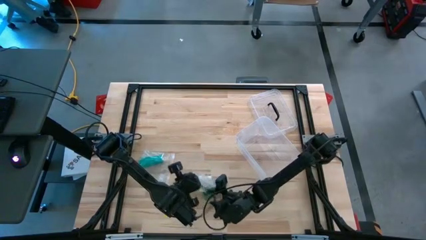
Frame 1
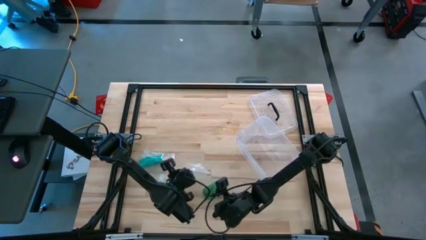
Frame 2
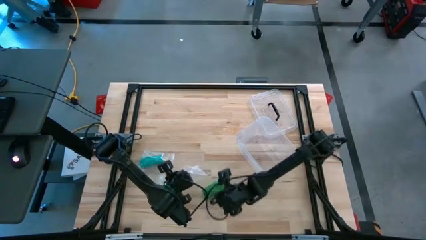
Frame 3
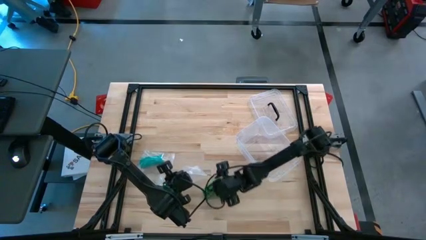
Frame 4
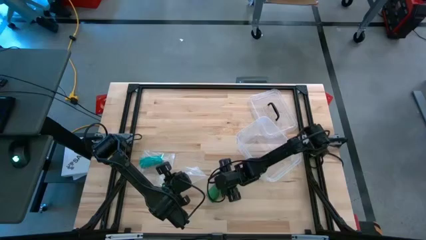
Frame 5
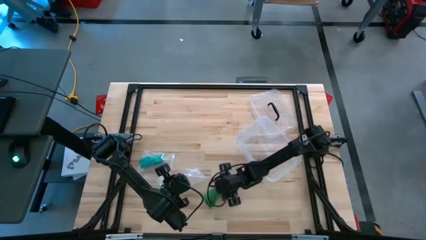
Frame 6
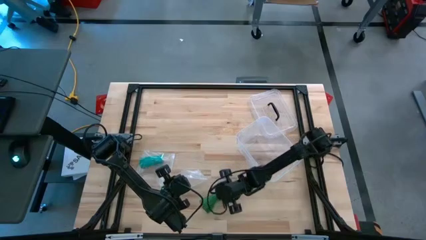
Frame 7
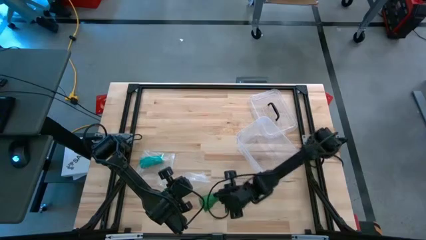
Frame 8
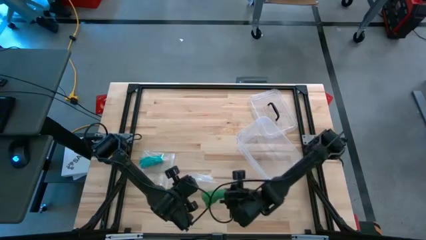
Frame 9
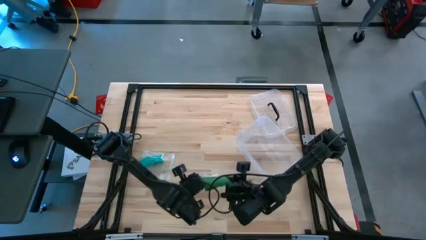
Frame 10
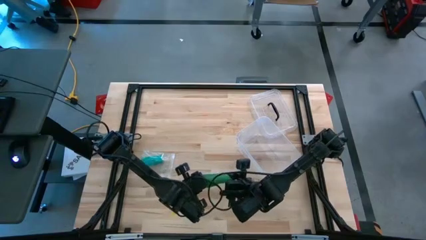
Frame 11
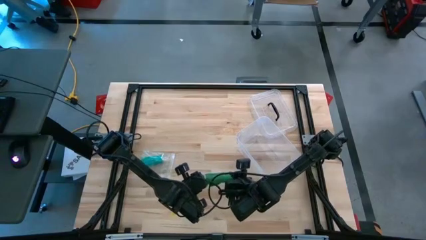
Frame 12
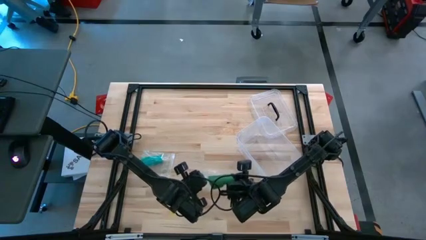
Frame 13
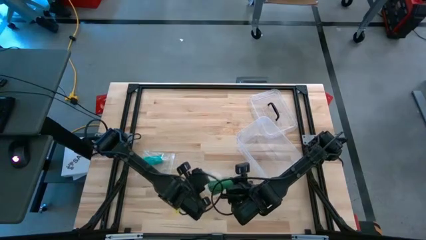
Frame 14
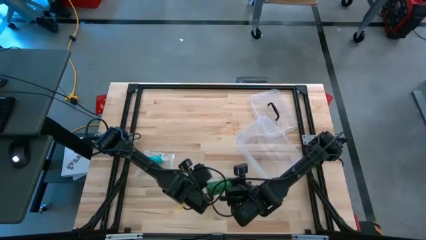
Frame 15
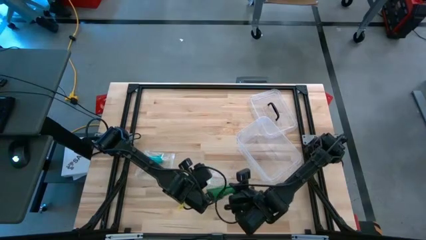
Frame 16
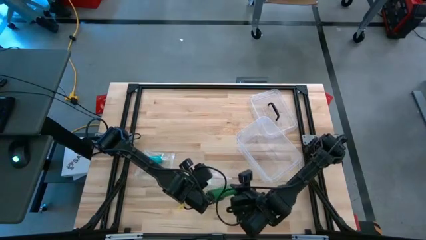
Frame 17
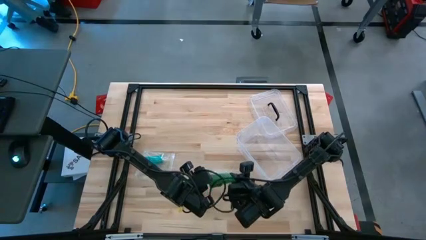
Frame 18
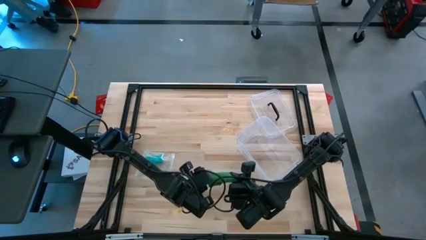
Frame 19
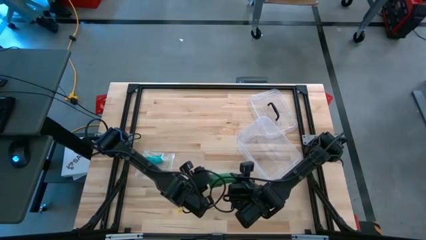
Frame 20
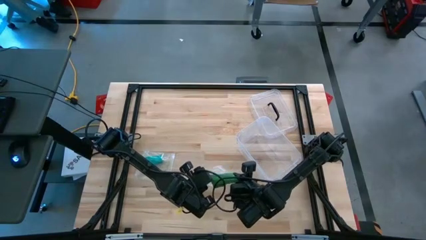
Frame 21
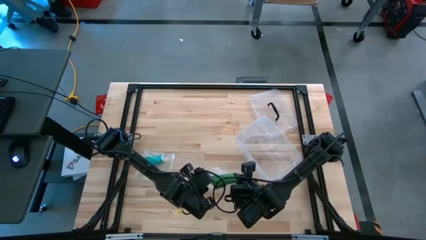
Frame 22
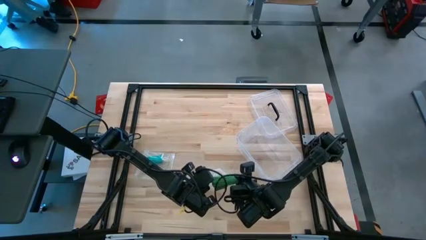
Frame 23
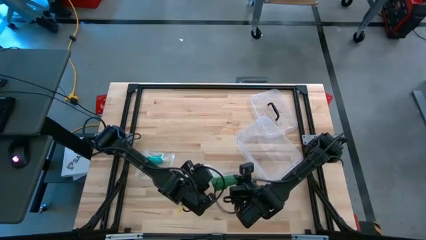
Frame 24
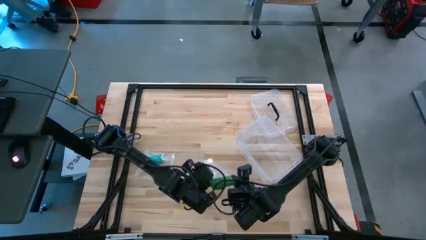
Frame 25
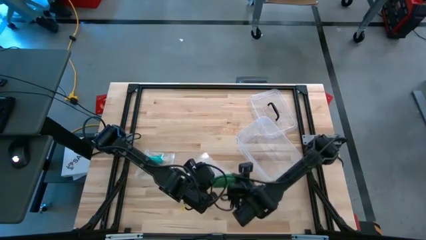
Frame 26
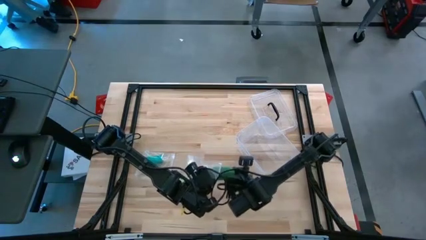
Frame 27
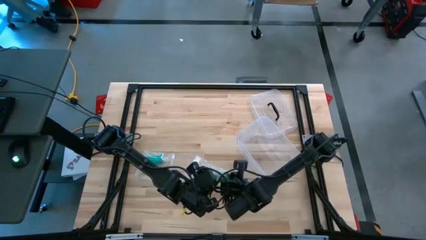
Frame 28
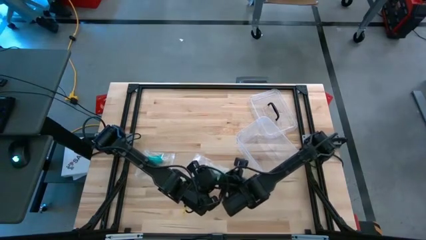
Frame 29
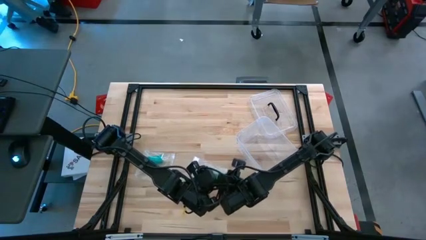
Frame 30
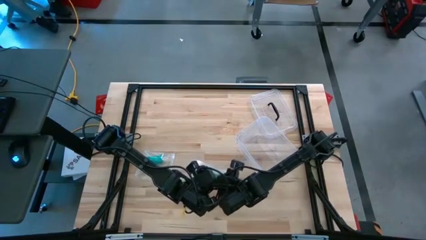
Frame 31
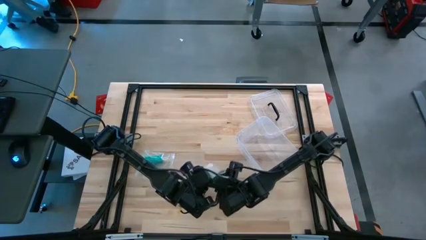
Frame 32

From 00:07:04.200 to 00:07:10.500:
Task: Roll bandage
Put the rolled green bandage into the transparent zip bag

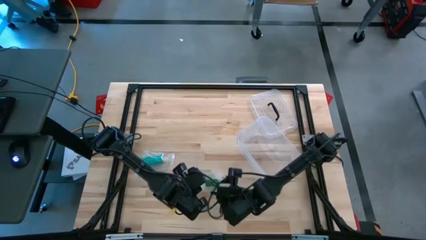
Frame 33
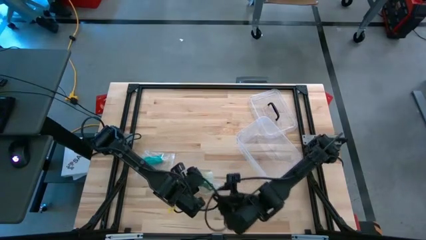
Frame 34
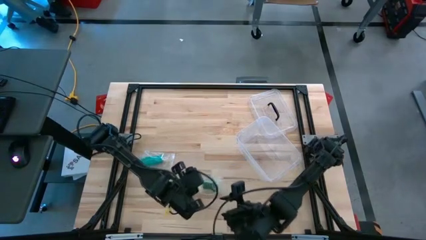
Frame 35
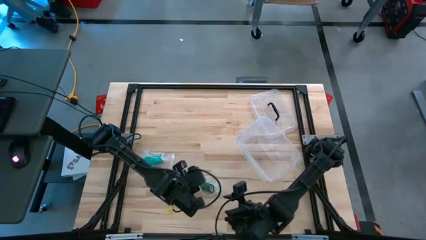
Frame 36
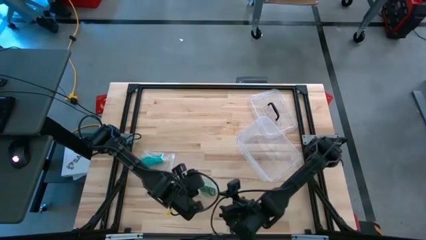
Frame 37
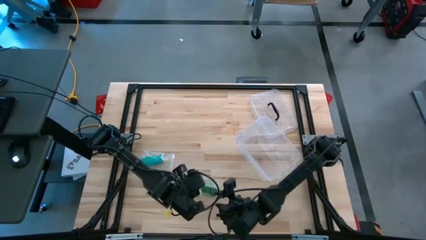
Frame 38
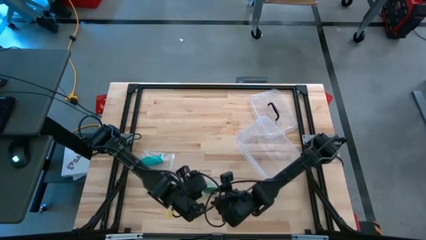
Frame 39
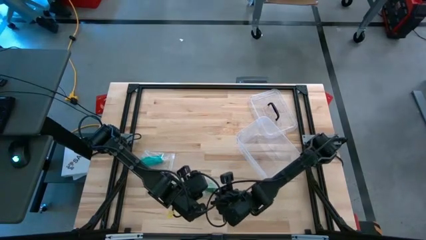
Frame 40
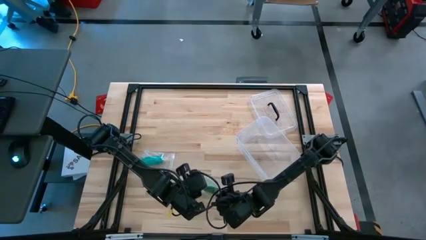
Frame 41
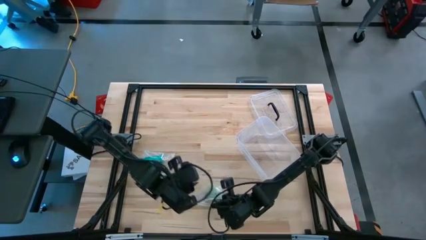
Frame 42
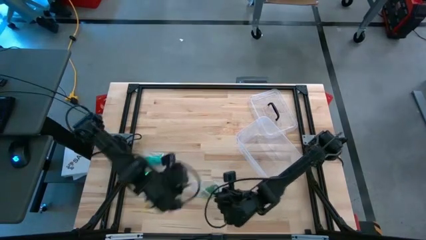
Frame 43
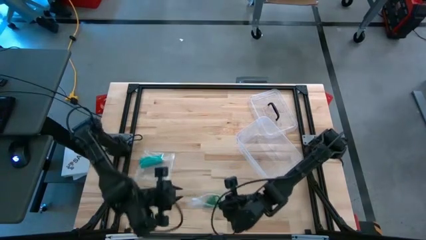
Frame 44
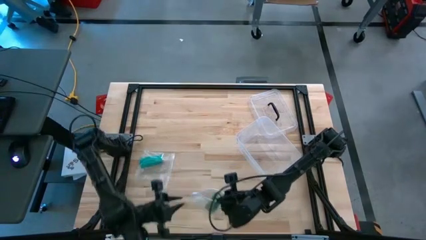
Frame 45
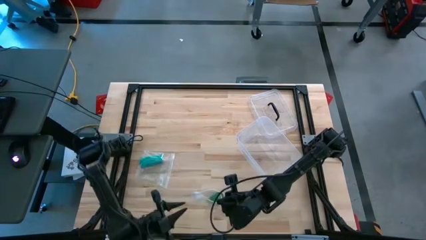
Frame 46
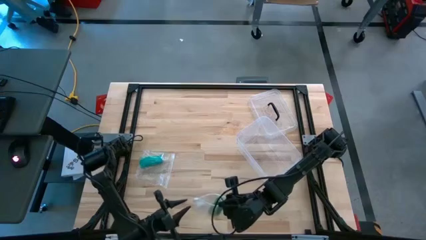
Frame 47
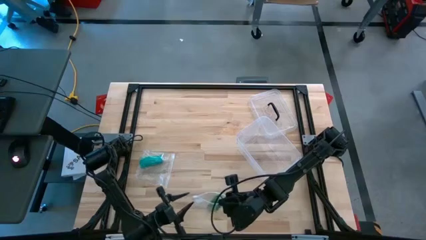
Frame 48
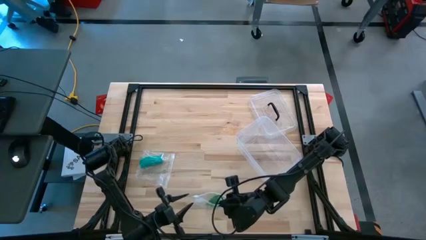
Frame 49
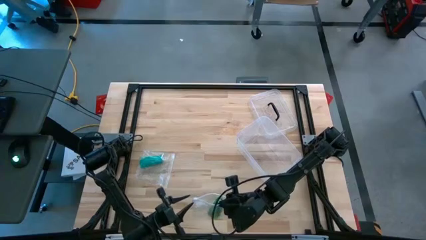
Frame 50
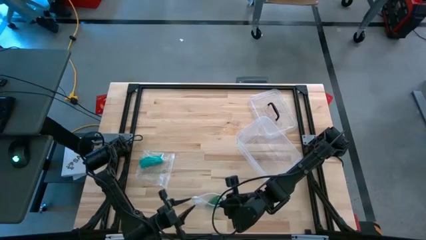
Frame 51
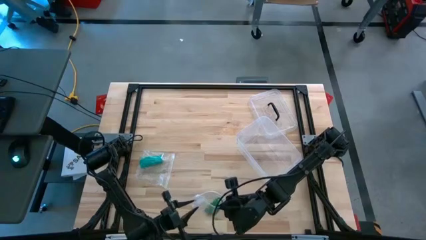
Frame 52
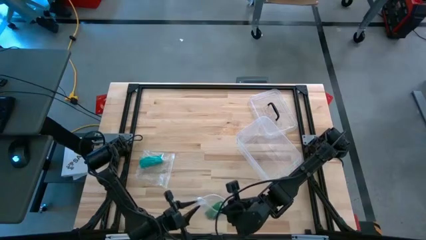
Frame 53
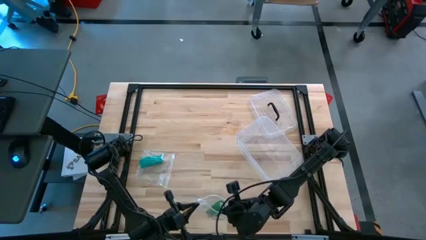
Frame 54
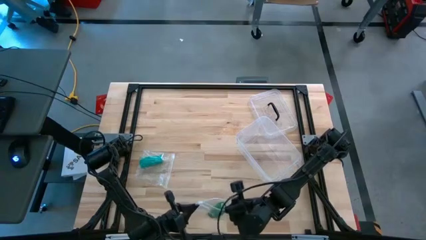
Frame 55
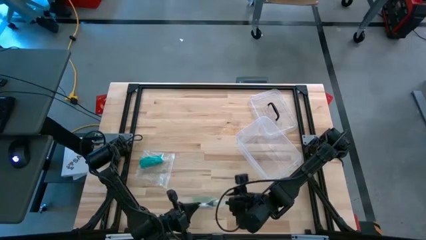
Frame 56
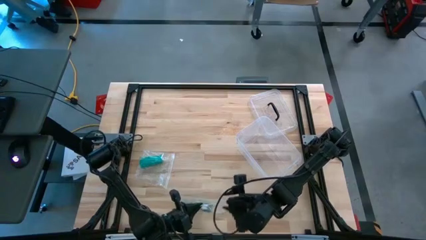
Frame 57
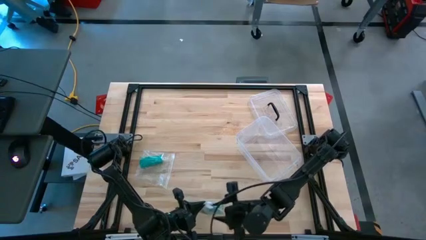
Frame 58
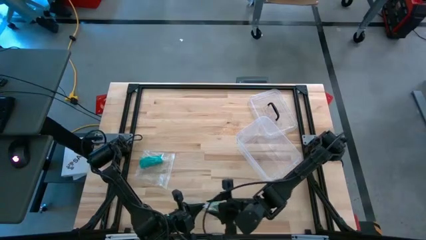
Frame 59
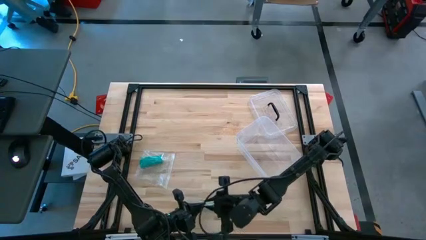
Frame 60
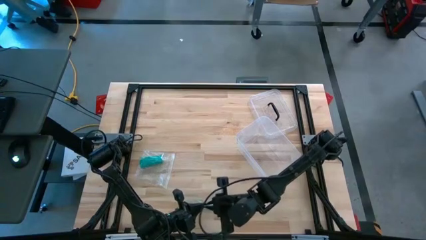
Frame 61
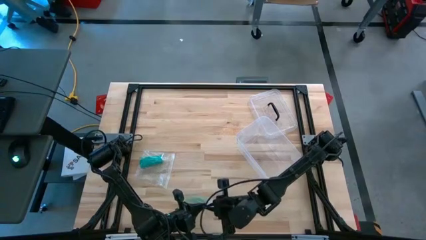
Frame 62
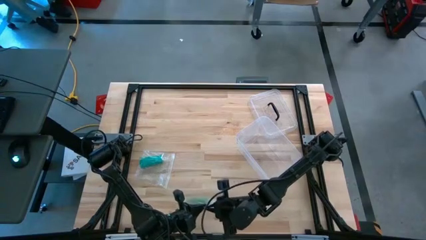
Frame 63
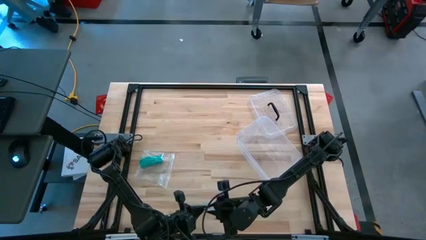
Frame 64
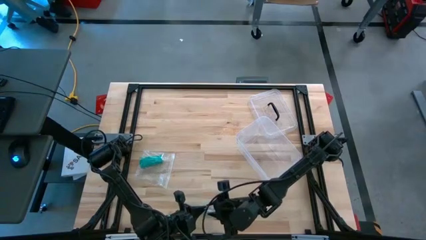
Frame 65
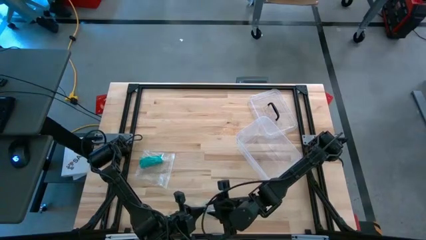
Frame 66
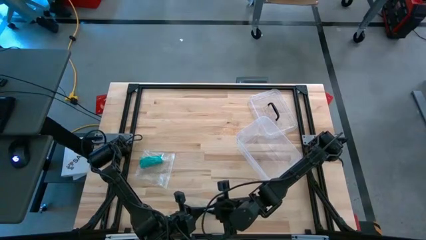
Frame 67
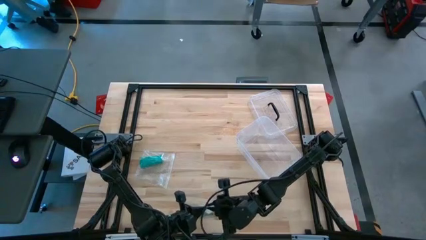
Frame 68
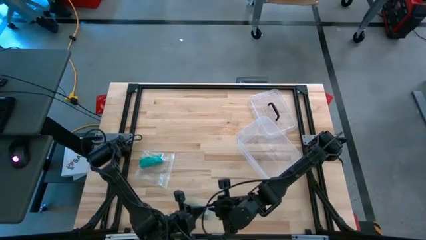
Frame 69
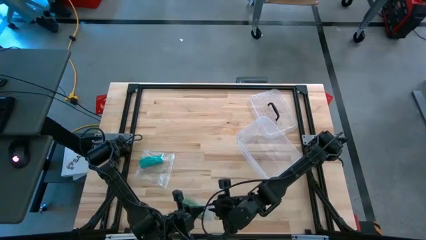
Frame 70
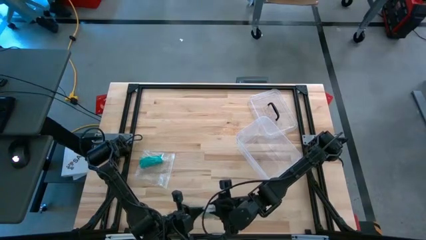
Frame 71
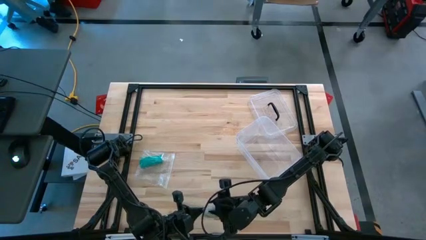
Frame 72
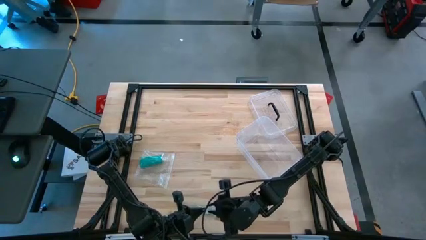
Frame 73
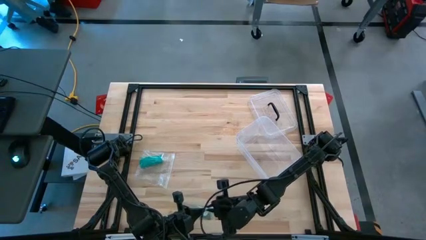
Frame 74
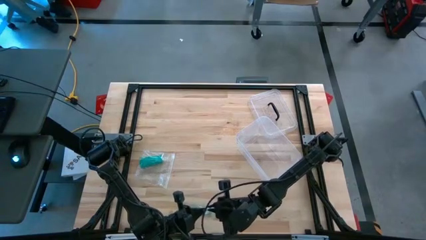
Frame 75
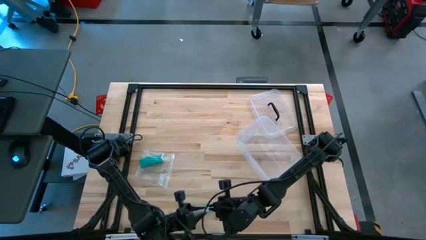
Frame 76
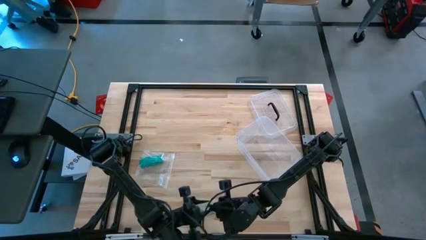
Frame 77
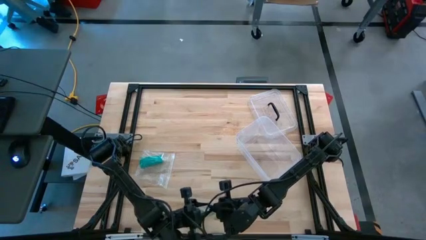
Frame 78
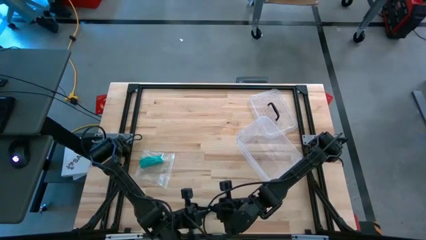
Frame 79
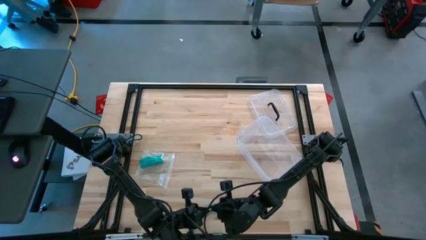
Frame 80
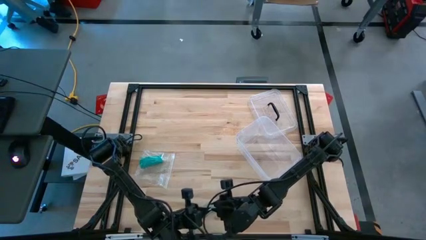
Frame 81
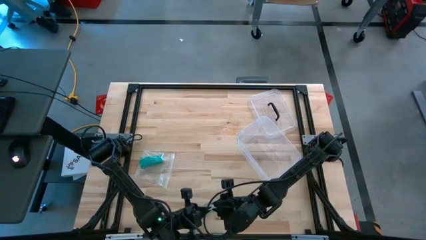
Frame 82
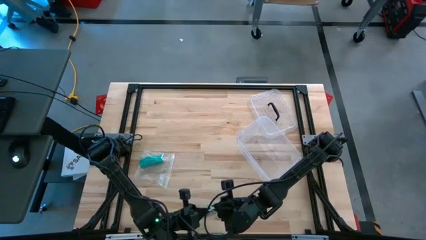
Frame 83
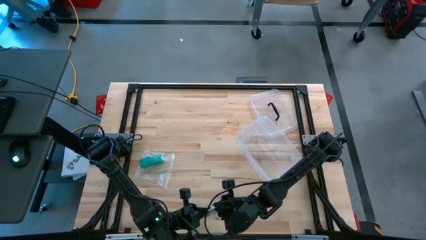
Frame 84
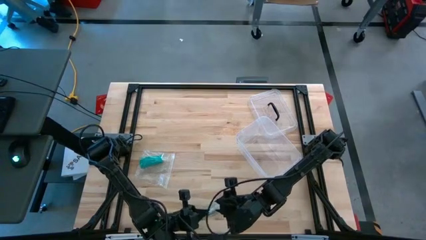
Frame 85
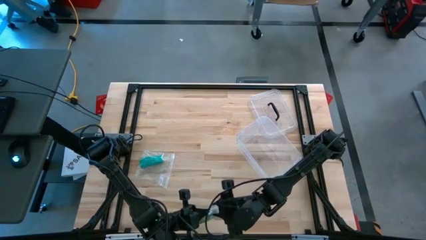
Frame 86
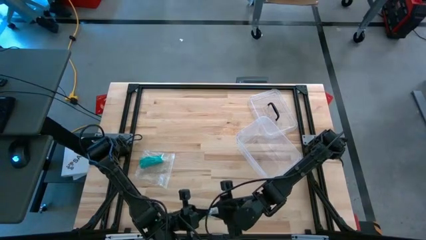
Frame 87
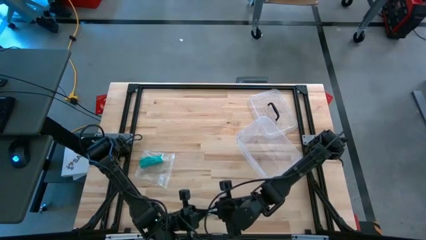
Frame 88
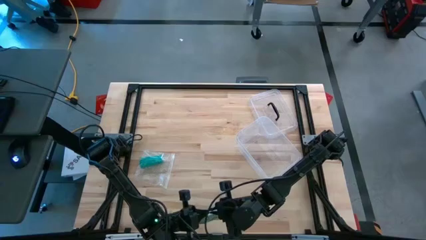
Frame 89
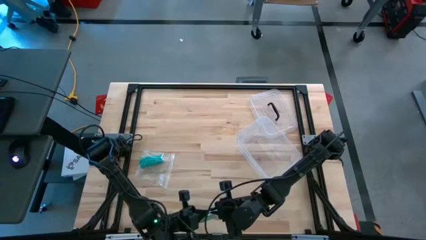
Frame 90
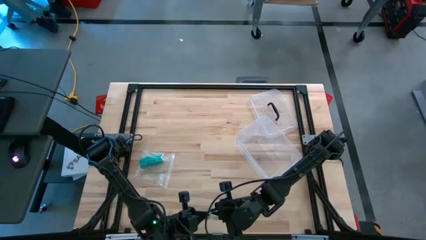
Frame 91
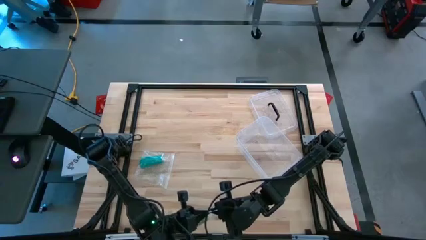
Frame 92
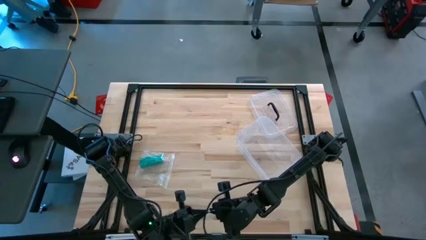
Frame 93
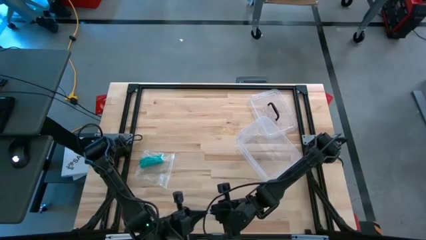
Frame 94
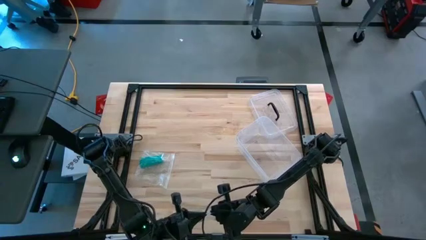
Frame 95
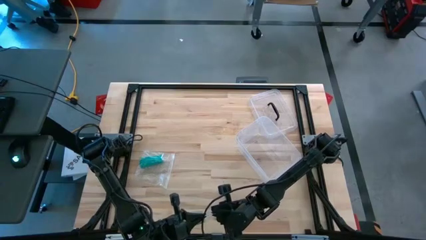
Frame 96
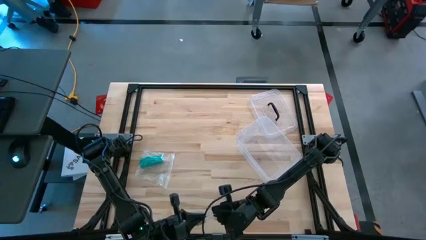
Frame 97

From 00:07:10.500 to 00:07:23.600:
Close the transparent zip bag
